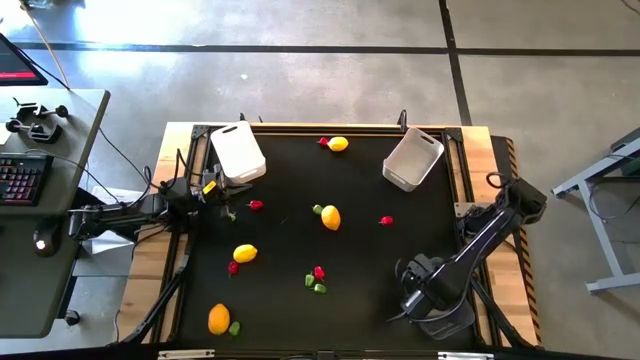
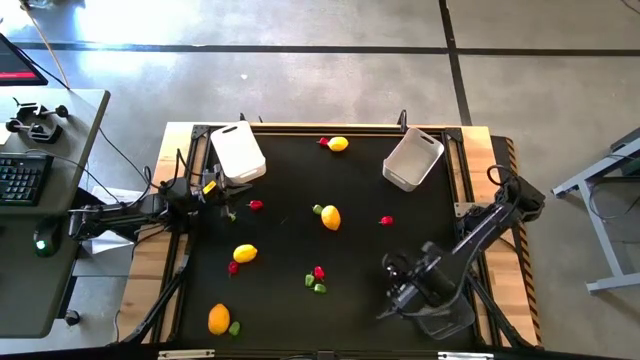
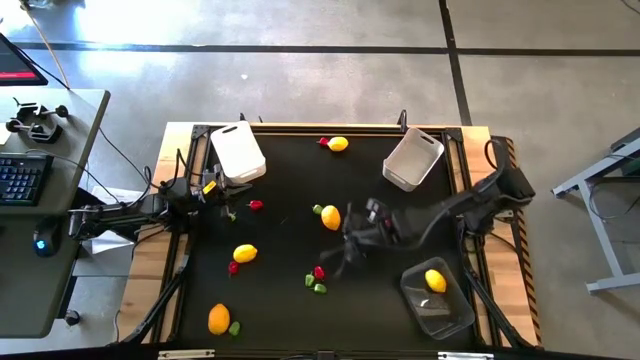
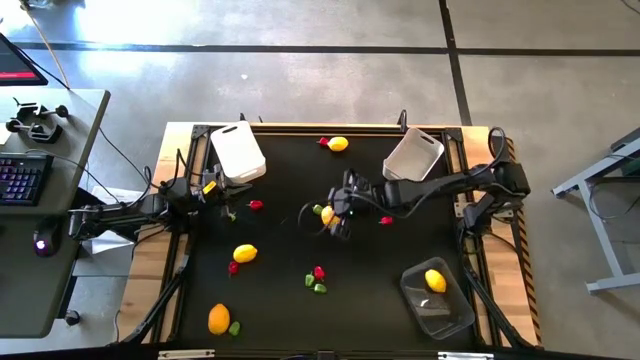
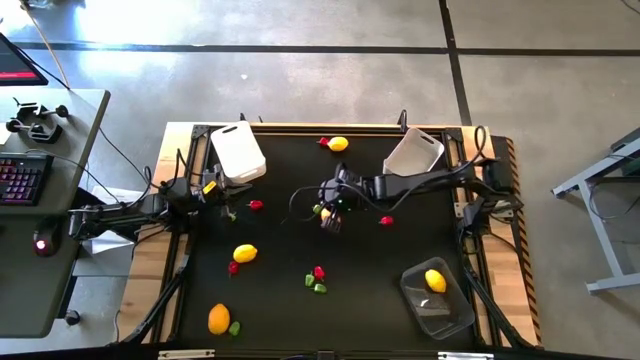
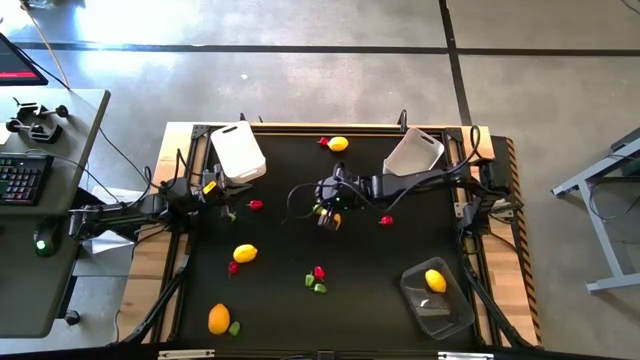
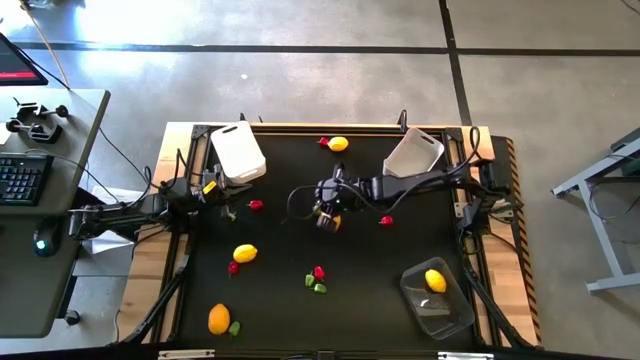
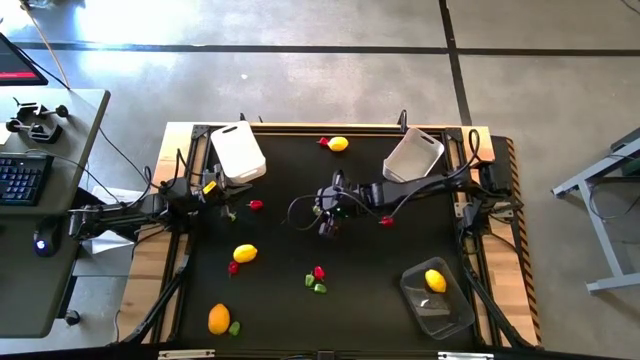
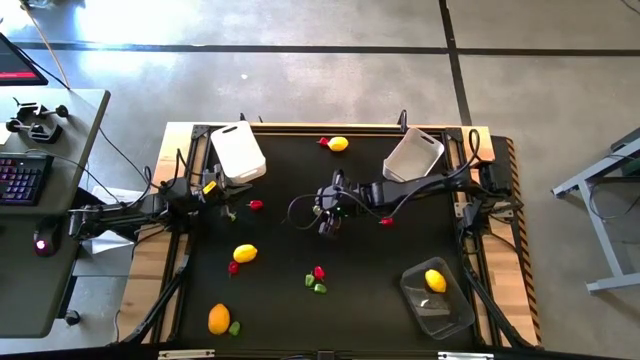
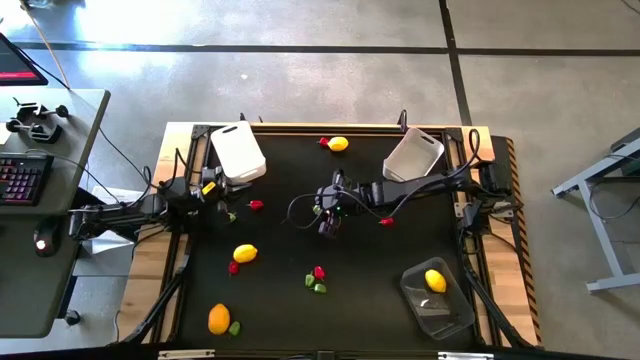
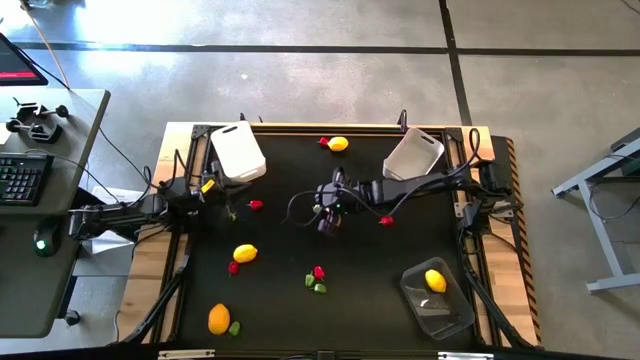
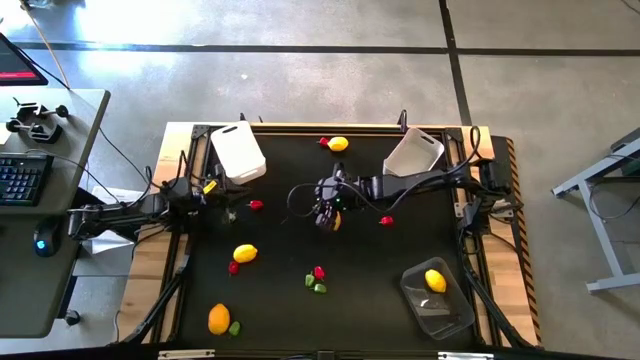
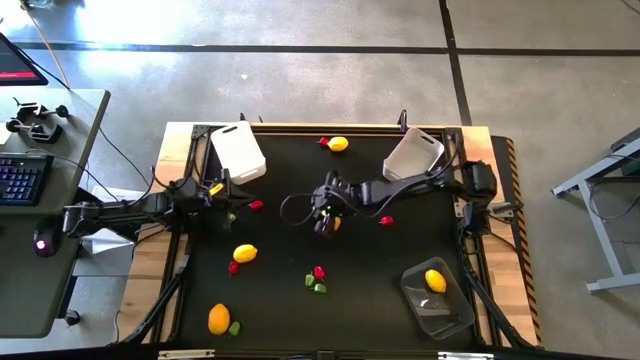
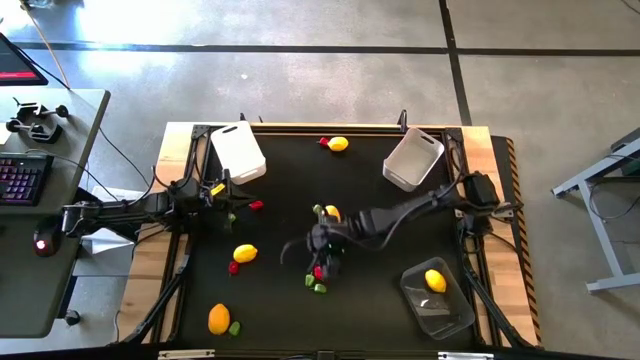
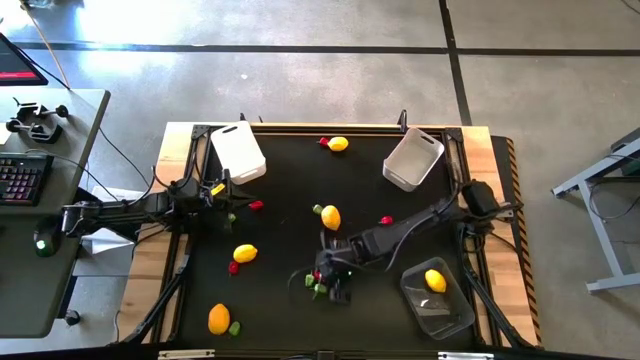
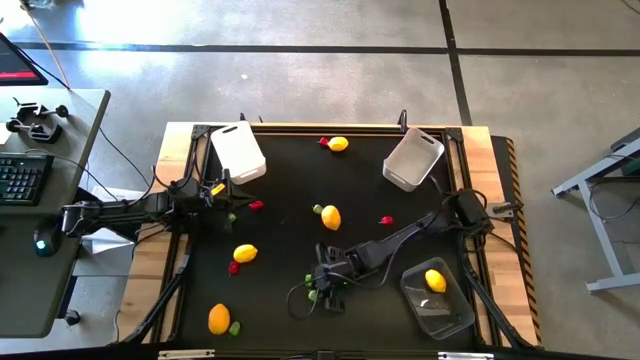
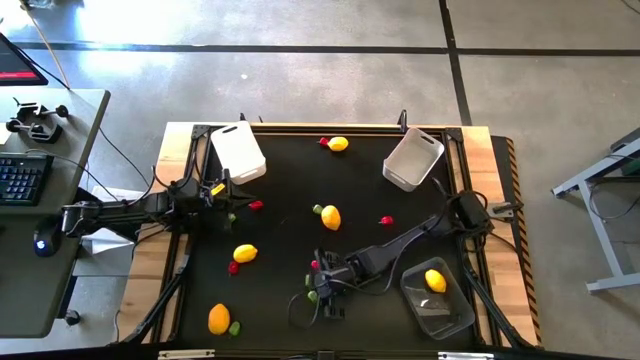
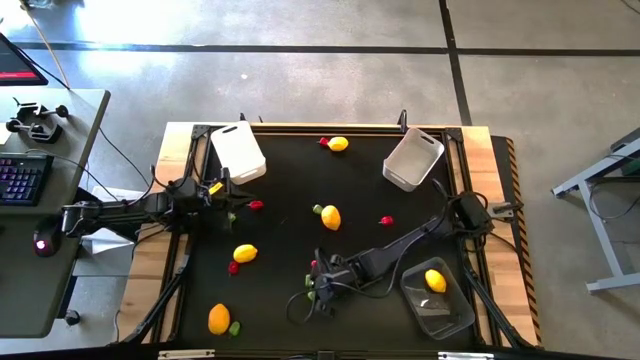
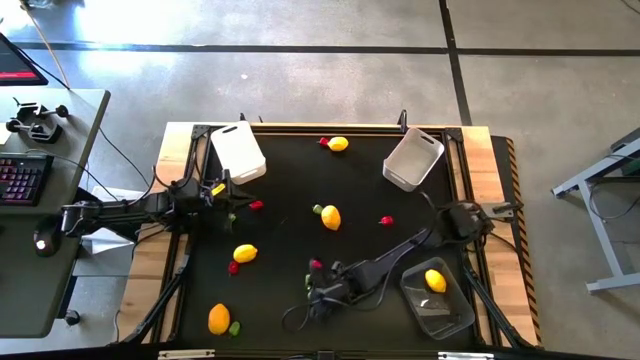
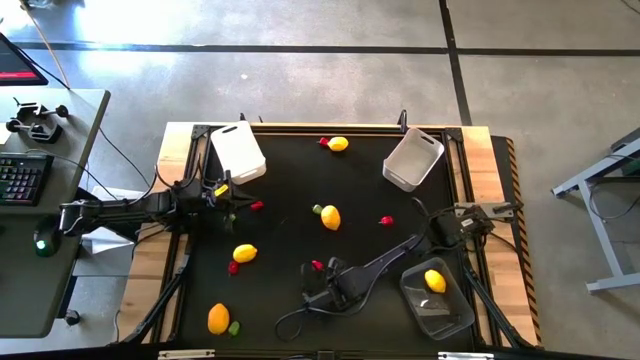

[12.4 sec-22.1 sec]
Task: Sort produce into baskets
Put the green chili pepper into the white bin

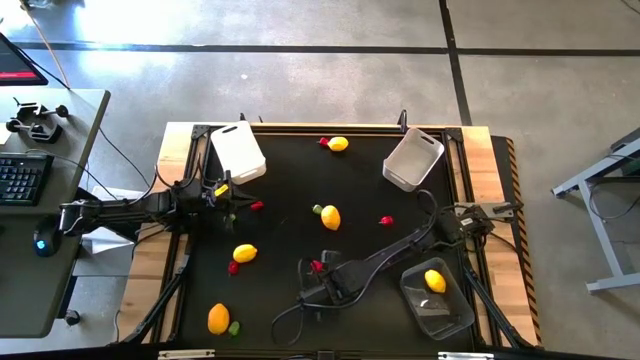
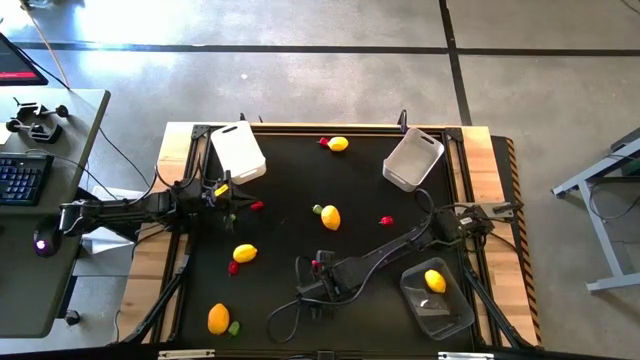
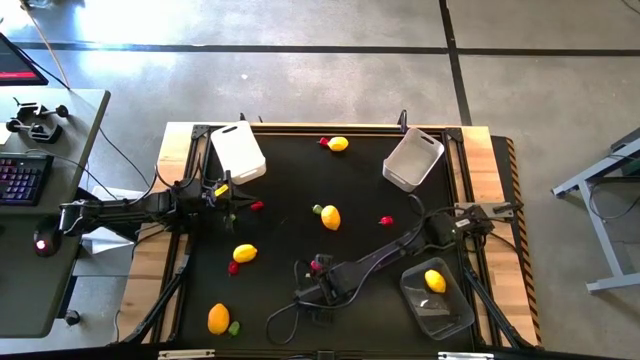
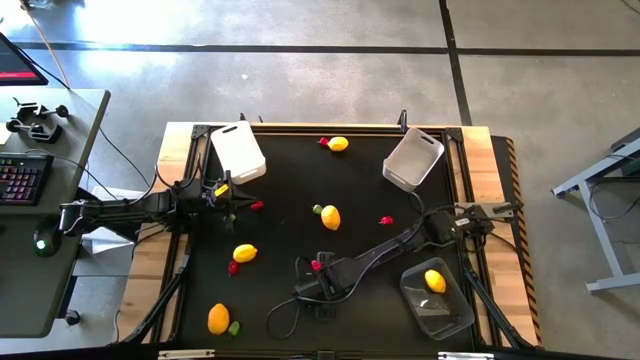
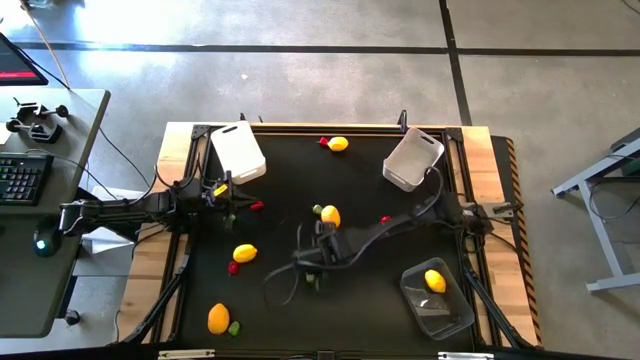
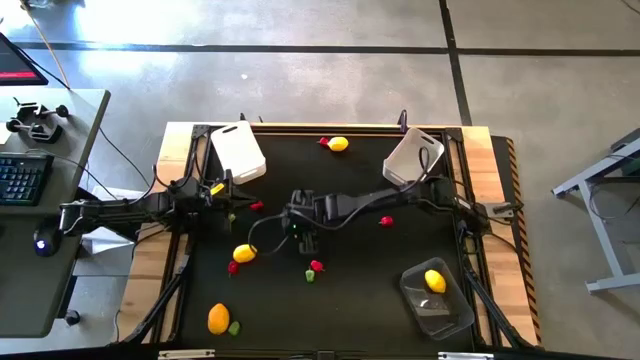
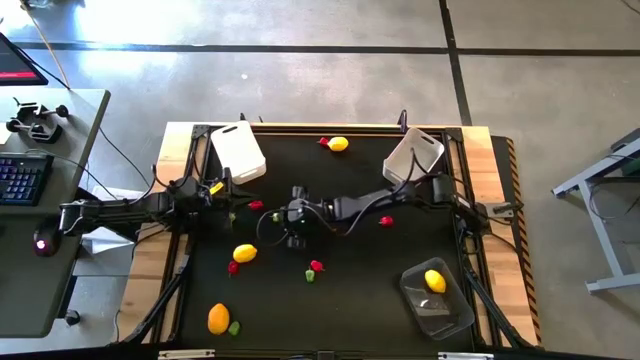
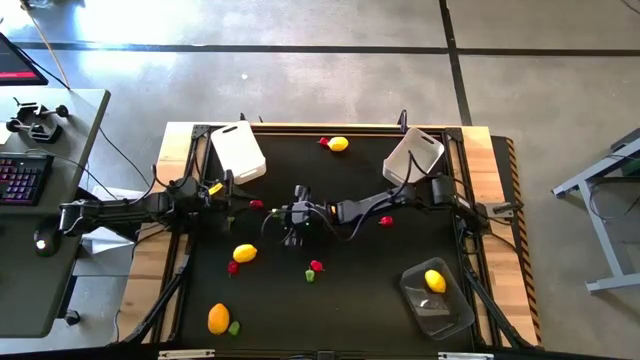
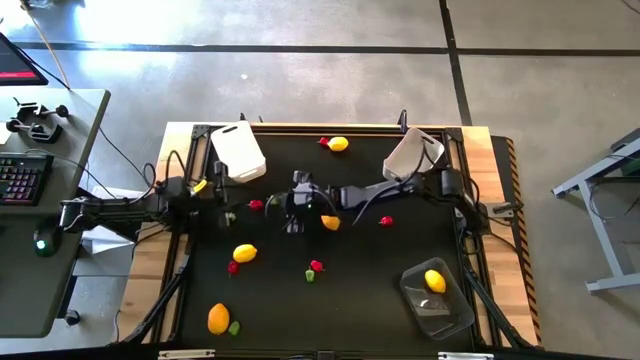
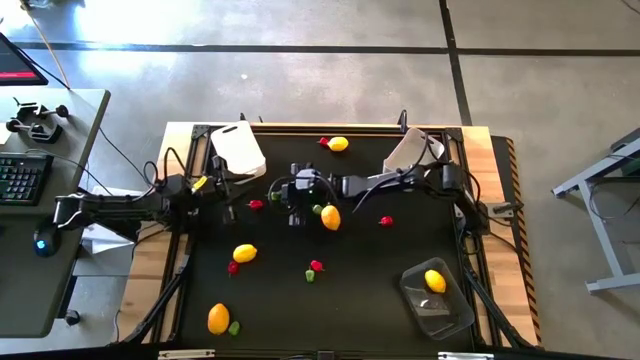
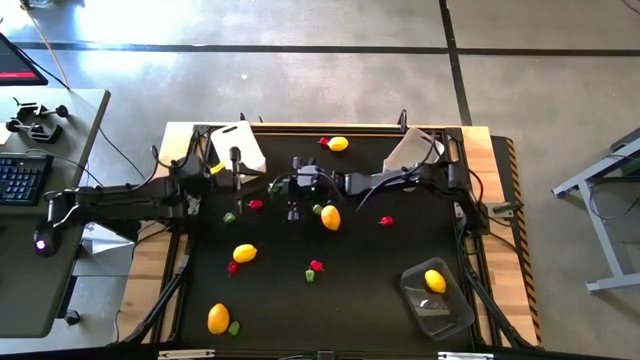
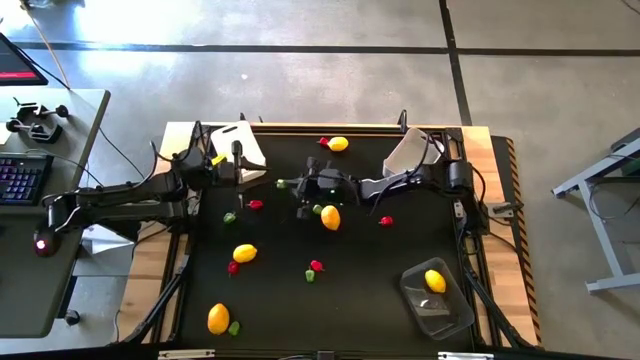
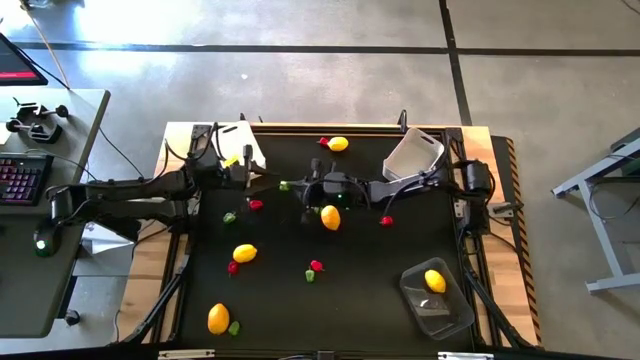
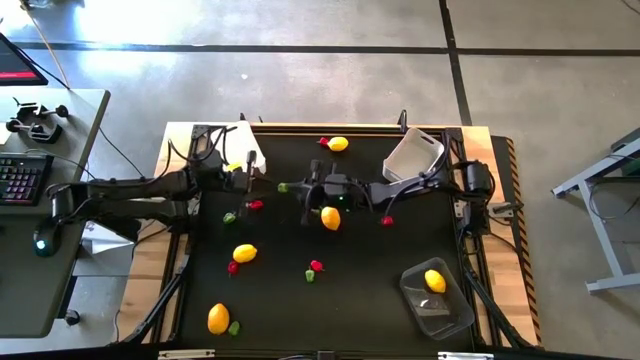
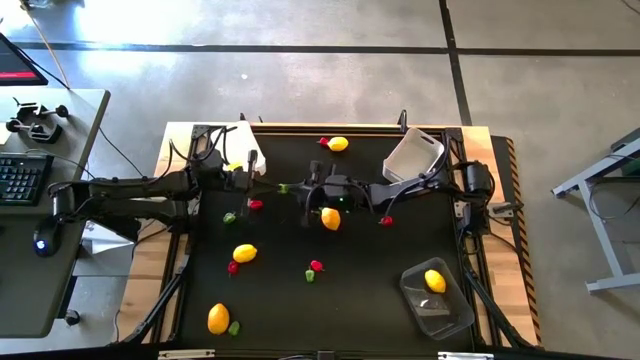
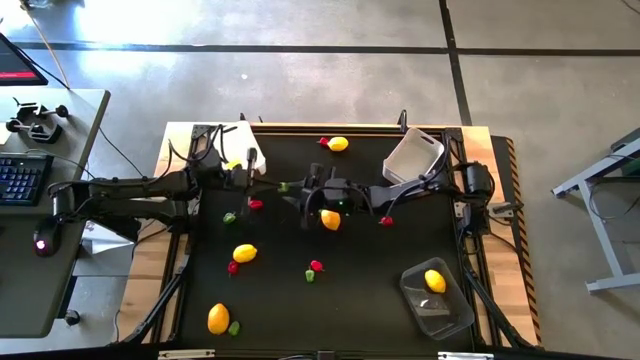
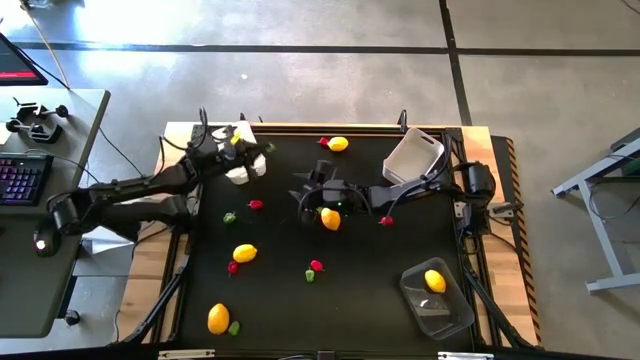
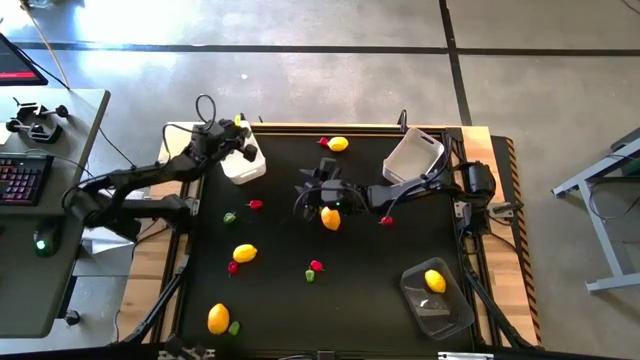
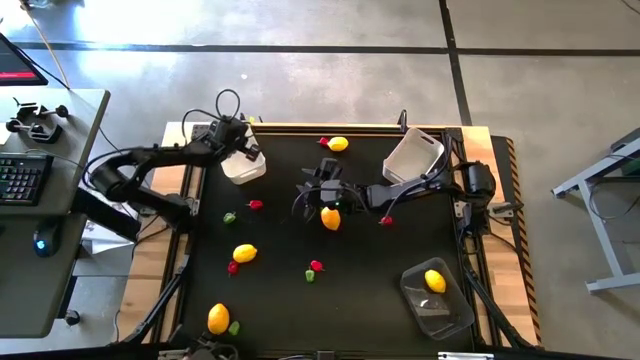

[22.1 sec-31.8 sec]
Put the green chili pepper into the white bin

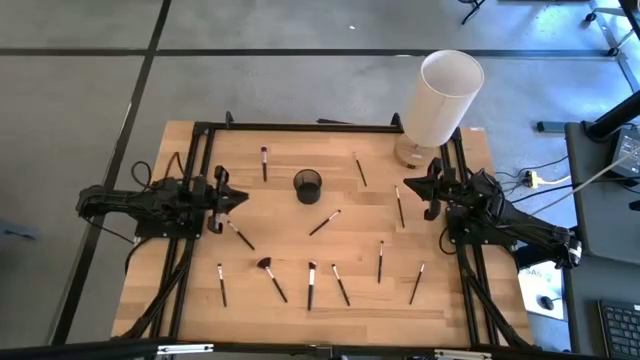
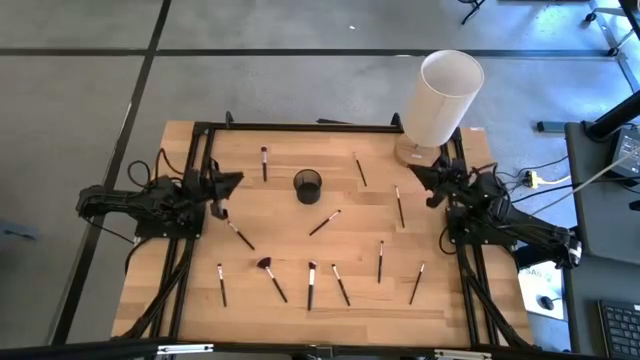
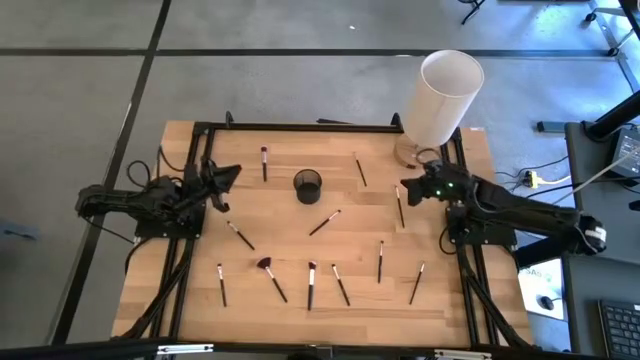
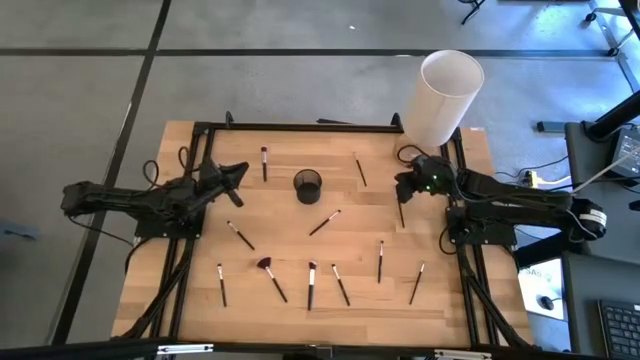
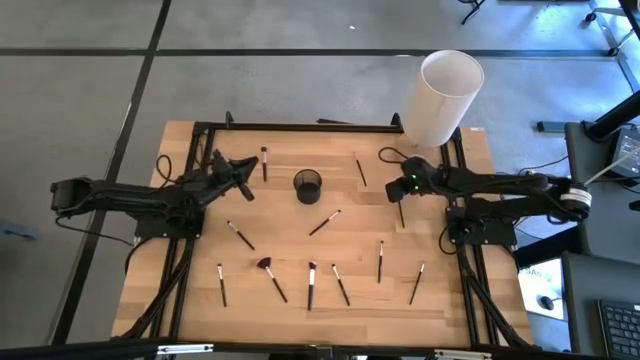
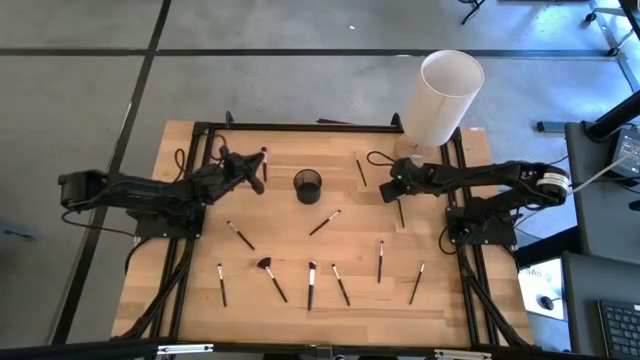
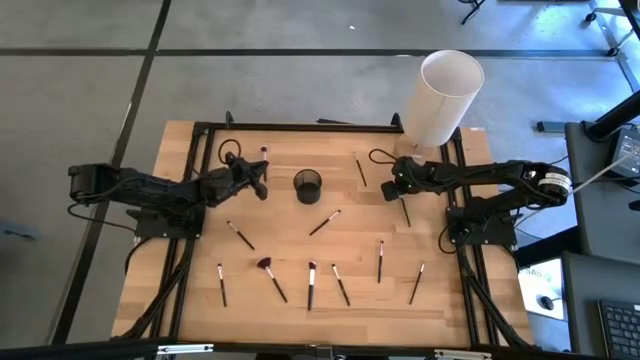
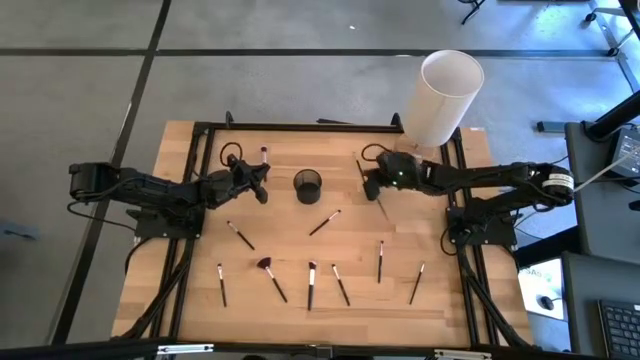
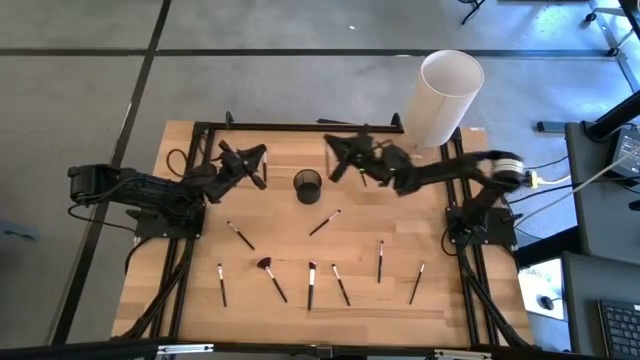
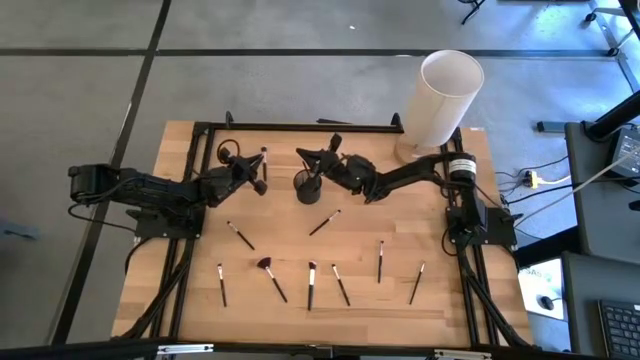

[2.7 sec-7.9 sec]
Task: Put items in baskets/containers
Put the black eyeshadow brush into the black pen holder
